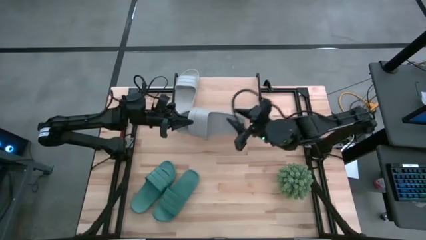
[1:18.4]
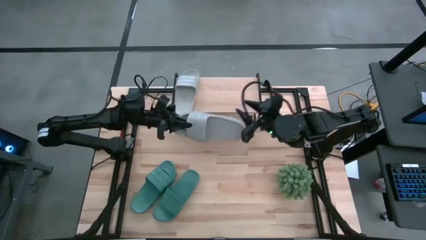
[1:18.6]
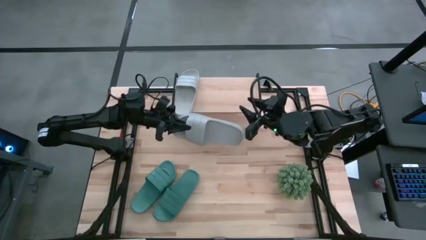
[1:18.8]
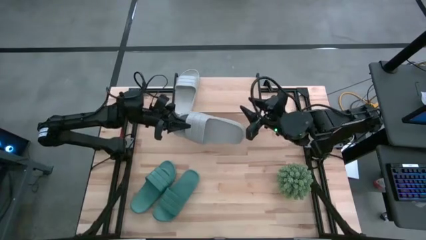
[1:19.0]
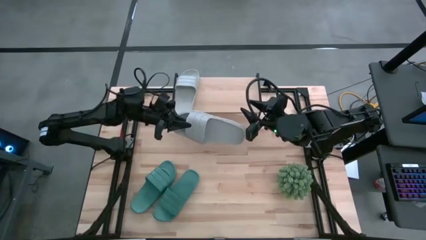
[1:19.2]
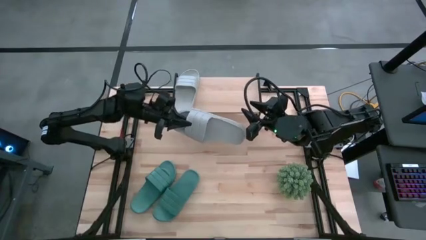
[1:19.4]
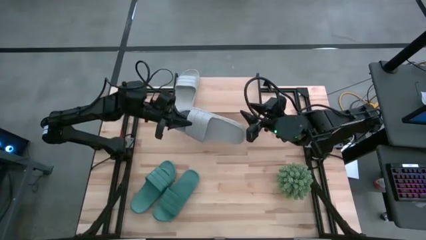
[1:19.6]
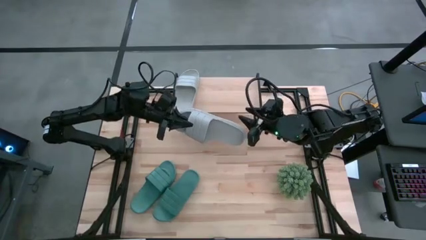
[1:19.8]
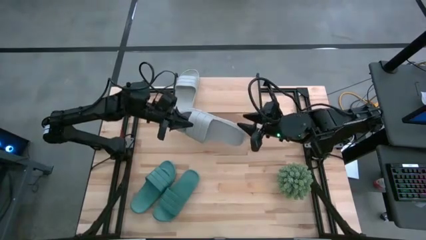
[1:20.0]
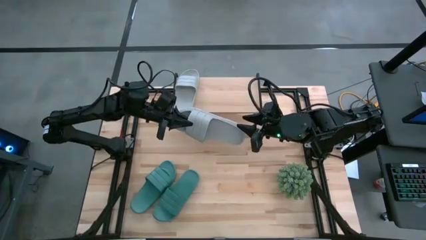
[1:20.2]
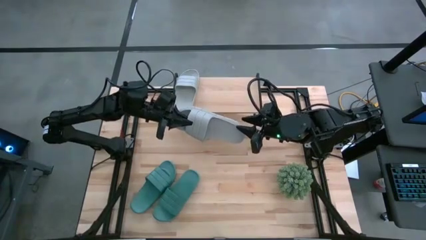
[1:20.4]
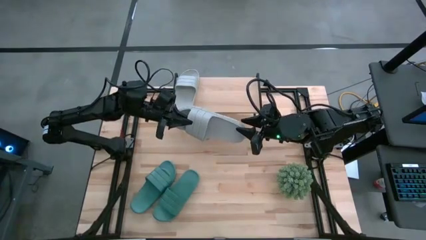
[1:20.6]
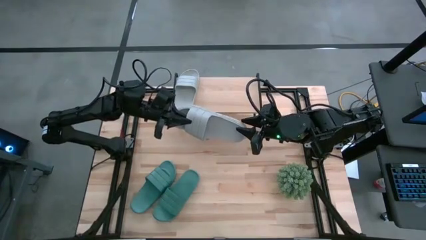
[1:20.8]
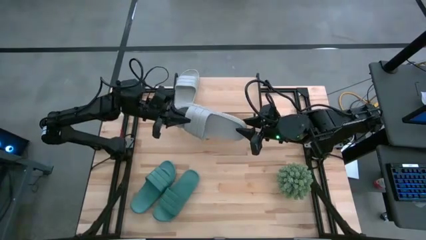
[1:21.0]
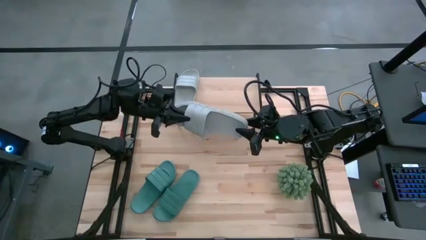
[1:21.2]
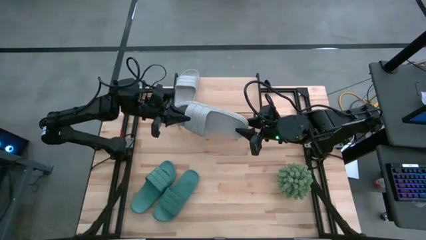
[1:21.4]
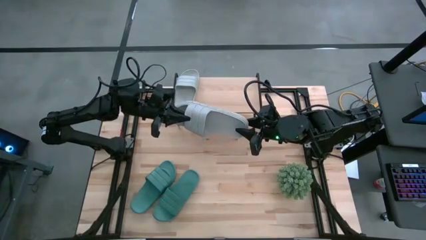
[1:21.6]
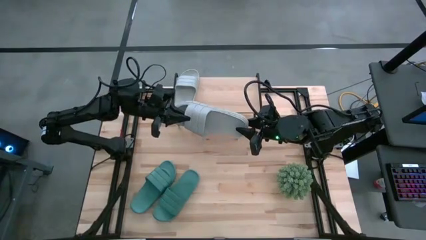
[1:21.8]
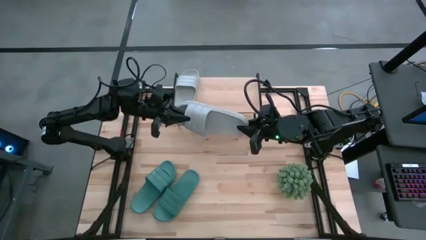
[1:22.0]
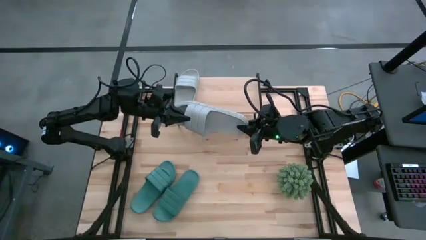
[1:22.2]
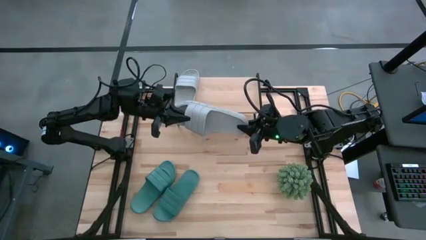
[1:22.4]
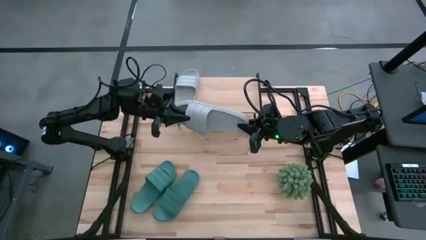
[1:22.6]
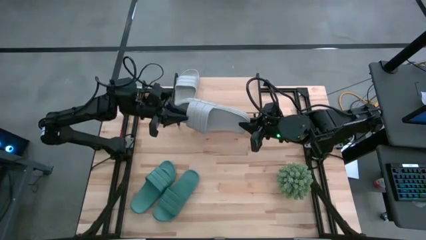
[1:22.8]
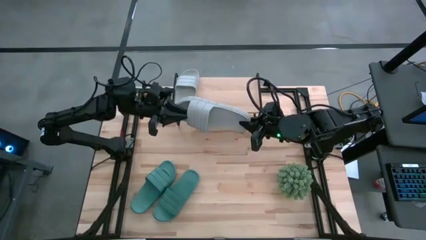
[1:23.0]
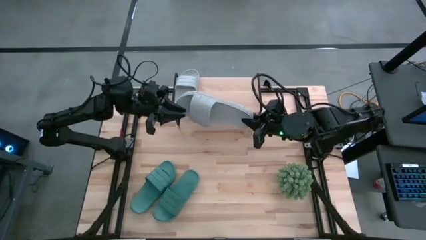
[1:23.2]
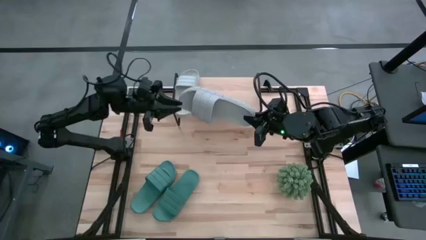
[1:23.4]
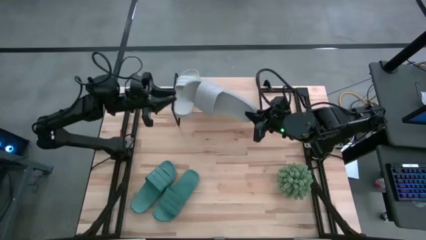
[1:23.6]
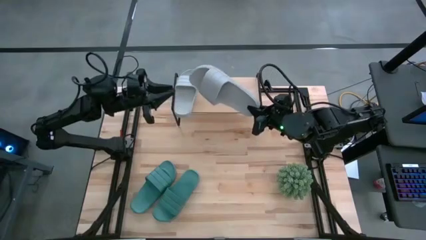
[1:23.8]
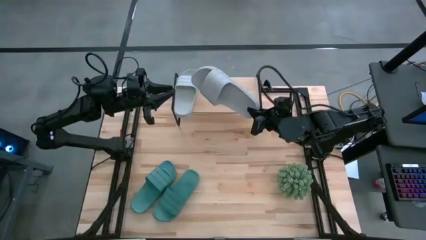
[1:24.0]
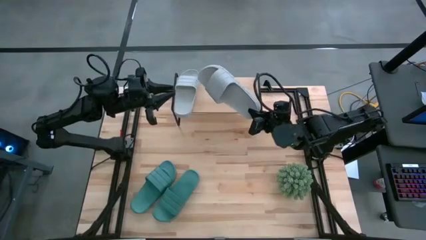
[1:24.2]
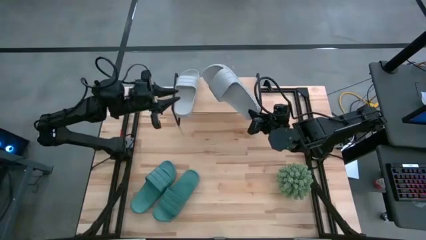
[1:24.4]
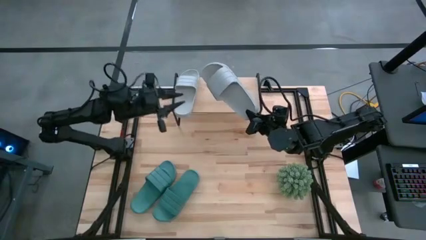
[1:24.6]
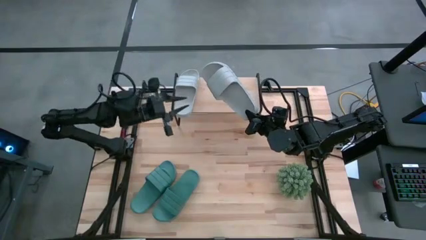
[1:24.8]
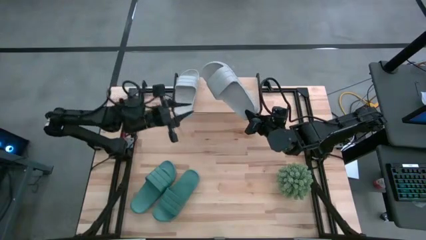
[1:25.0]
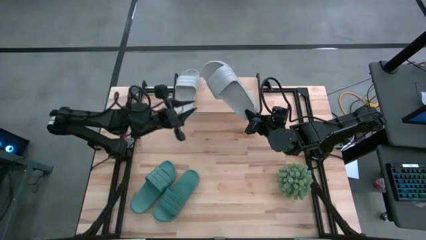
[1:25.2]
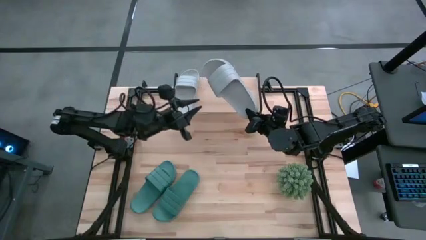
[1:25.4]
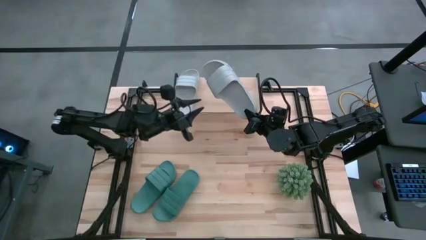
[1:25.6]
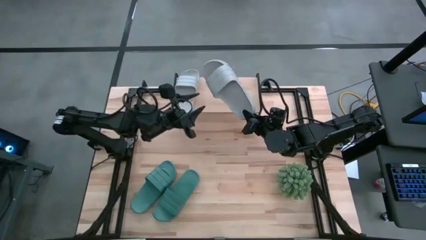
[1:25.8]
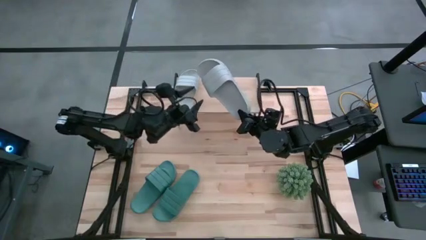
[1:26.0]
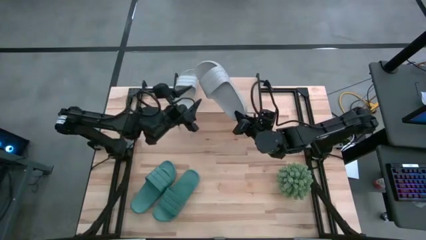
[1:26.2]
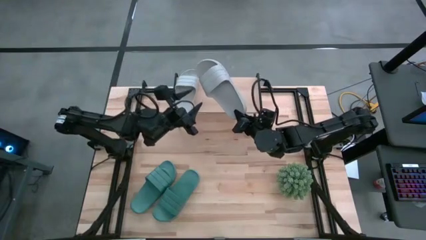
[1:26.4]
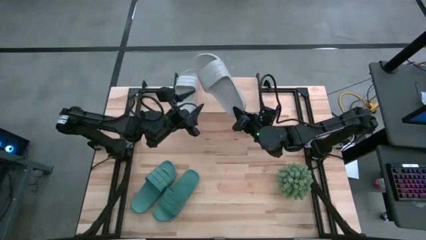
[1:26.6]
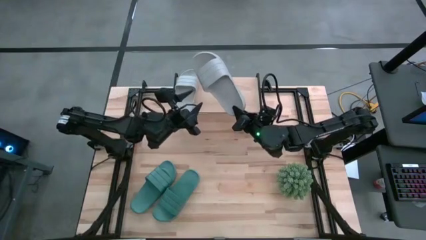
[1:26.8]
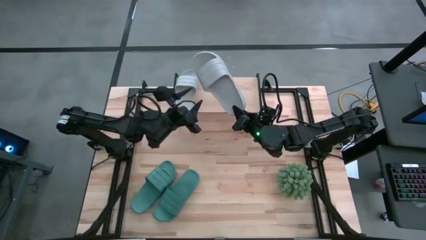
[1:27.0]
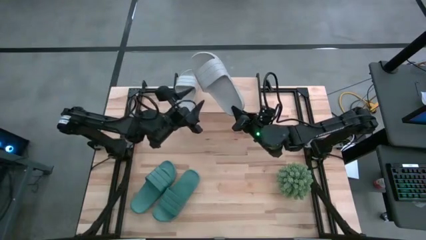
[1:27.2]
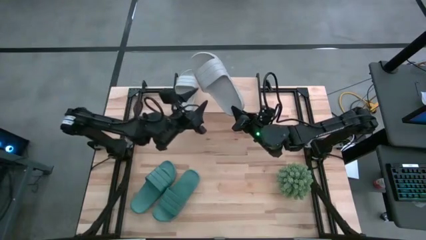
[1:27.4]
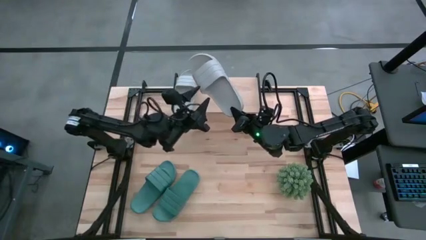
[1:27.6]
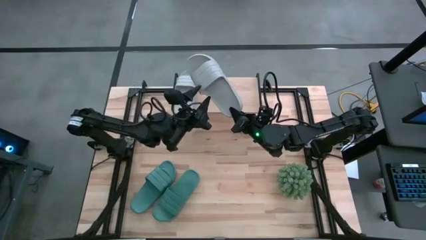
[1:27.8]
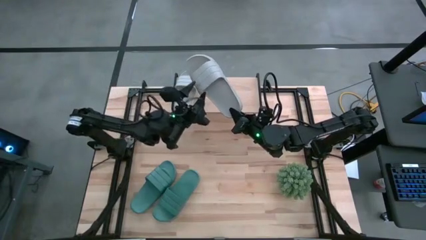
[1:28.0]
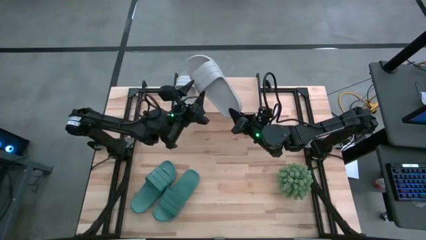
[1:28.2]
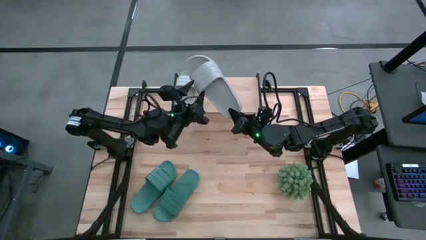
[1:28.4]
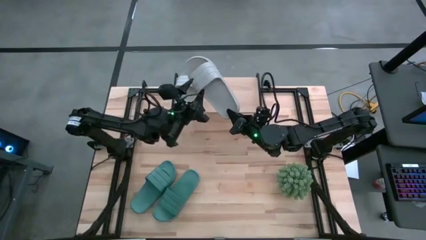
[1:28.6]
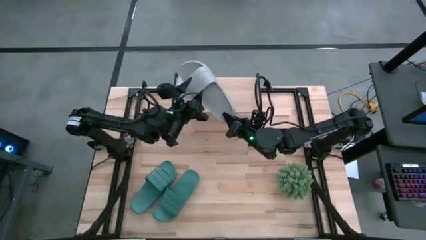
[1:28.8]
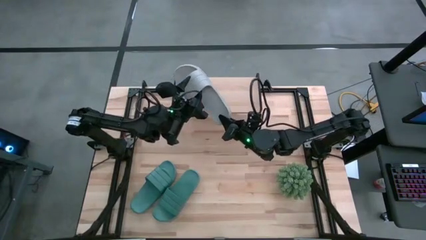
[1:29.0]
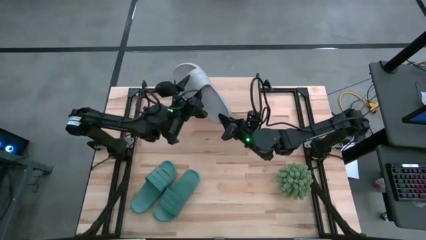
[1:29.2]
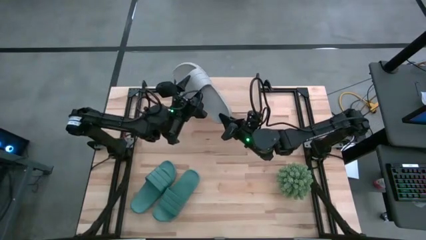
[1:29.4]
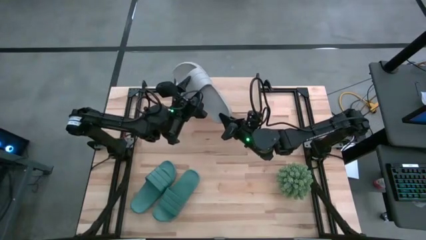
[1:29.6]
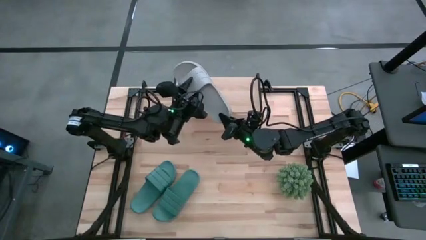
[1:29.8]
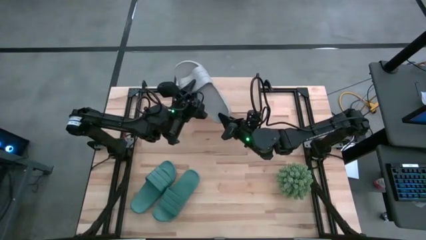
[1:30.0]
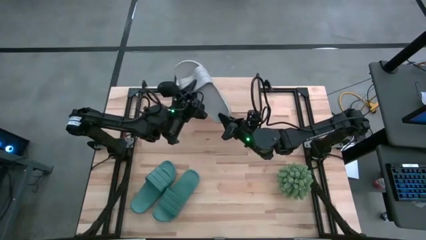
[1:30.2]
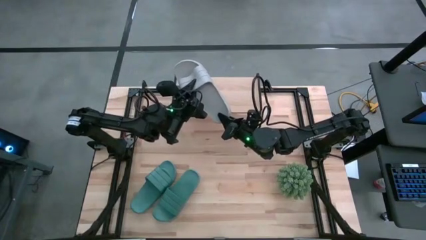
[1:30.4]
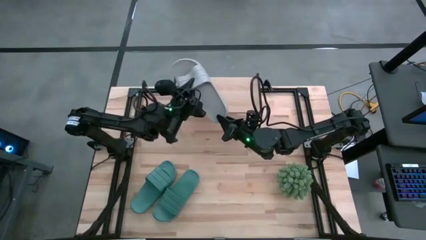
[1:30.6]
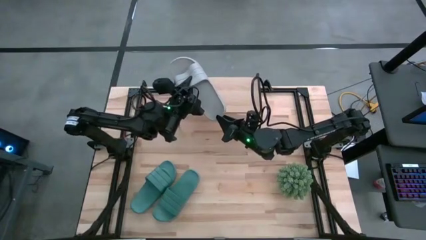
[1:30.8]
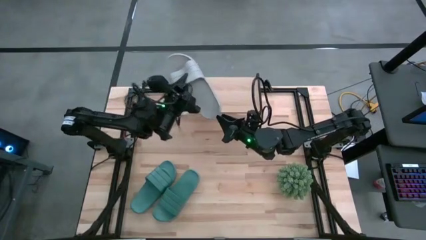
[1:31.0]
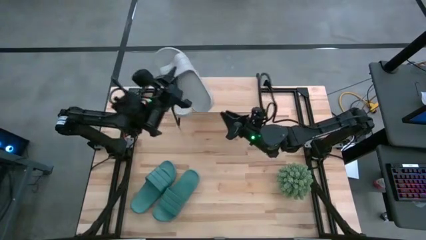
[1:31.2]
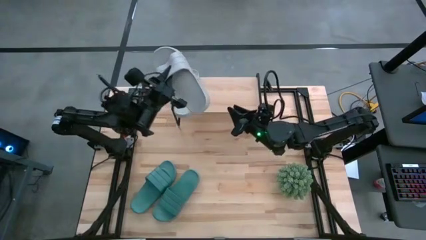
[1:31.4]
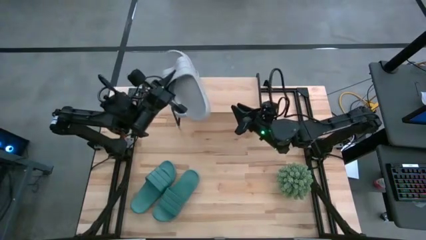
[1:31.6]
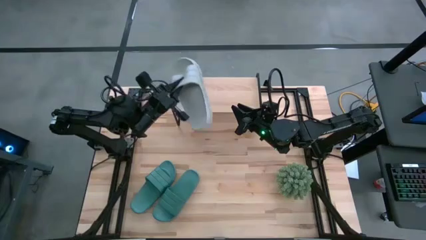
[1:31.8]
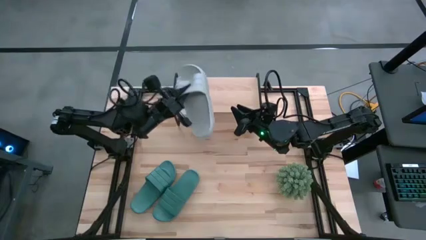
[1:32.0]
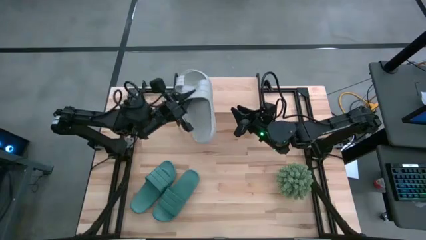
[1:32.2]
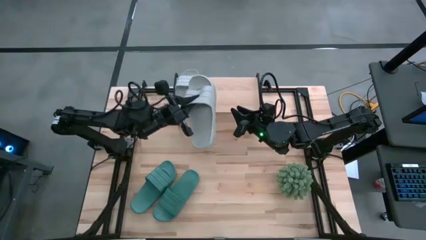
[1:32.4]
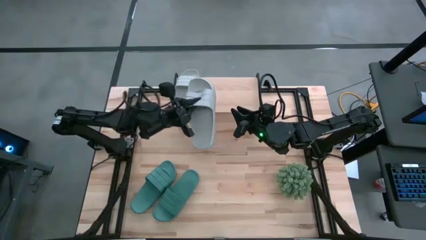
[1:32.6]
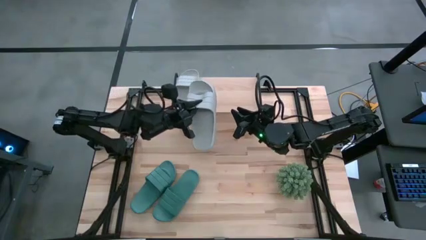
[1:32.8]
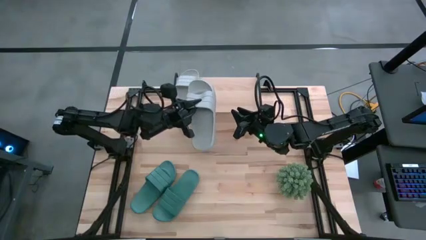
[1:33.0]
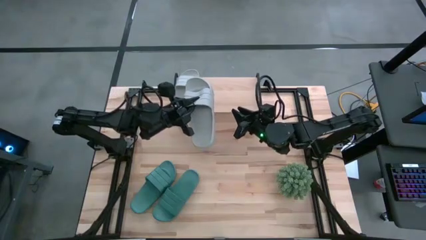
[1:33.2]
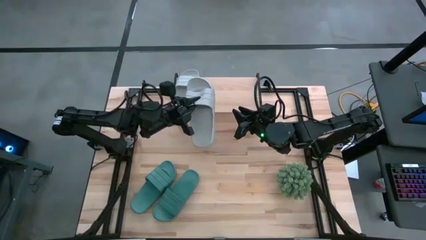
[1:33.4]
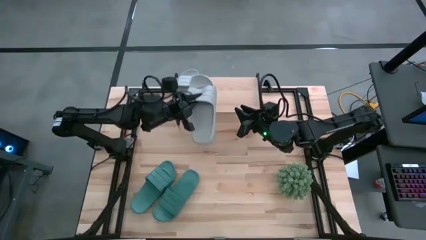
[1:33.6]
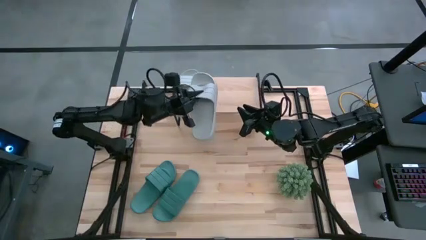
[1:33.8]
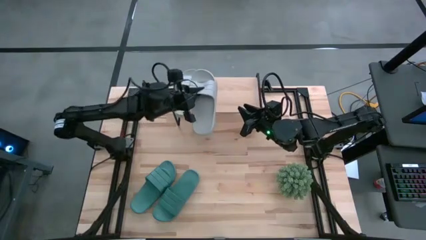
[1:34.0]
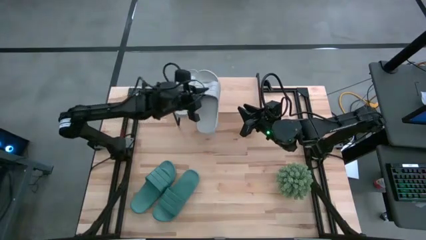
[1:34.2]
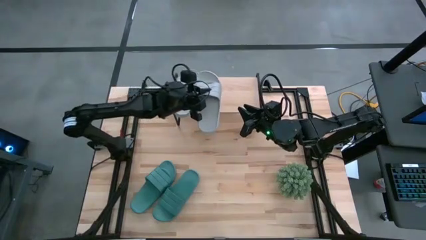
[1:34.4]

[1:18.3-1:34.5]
Task: Pick and place slides into the shelf
Put the gray slide on the shelf
